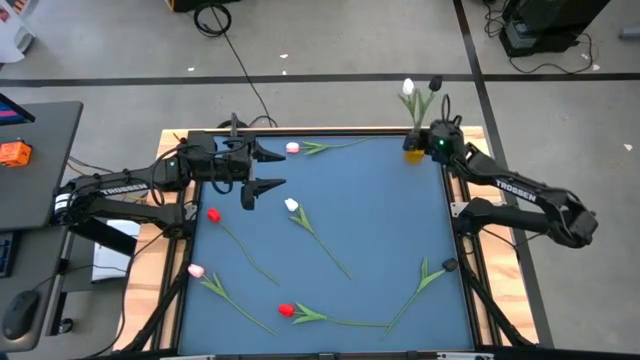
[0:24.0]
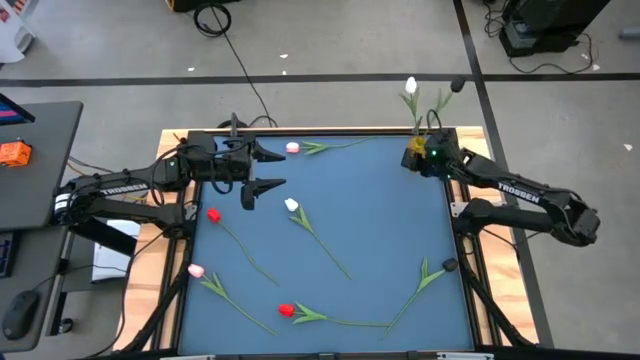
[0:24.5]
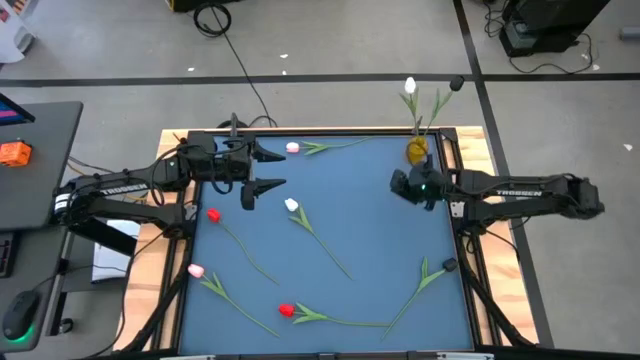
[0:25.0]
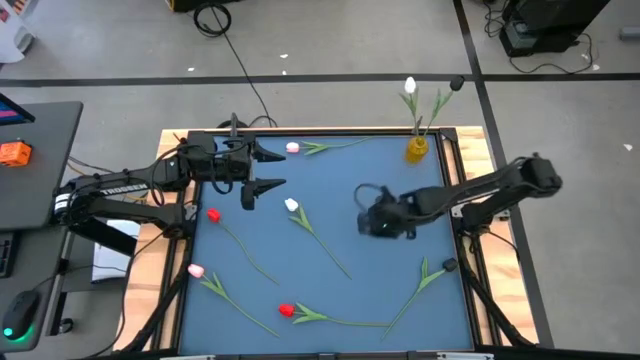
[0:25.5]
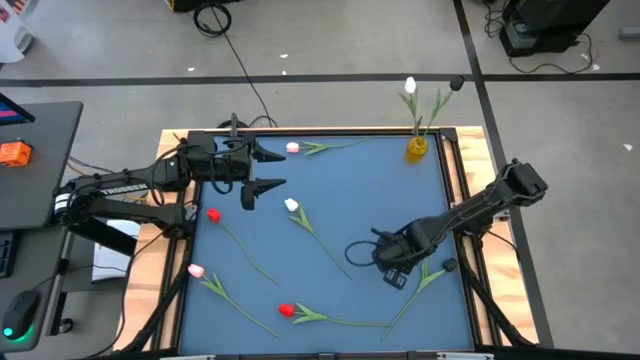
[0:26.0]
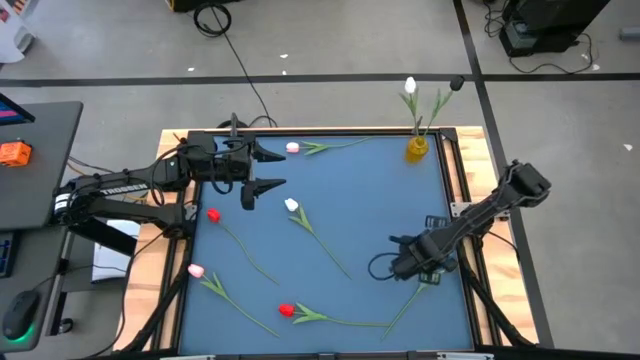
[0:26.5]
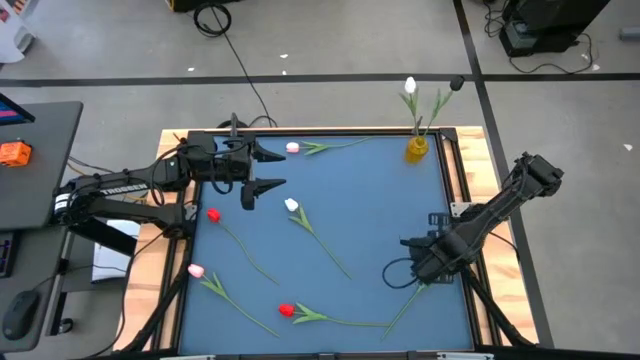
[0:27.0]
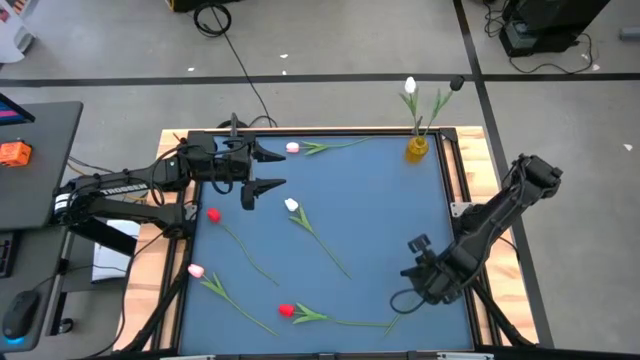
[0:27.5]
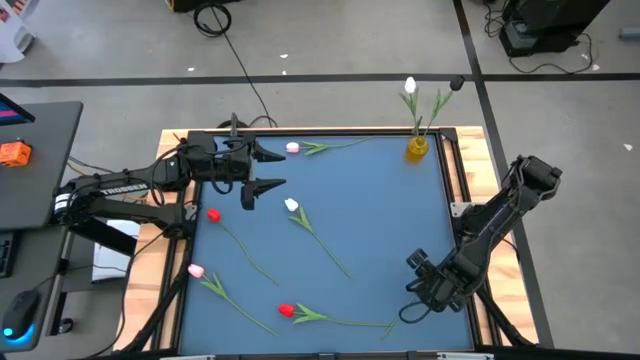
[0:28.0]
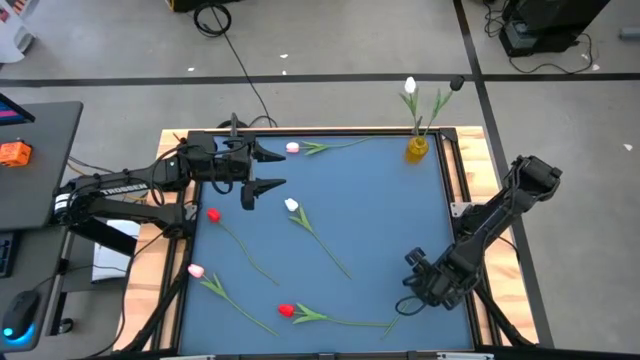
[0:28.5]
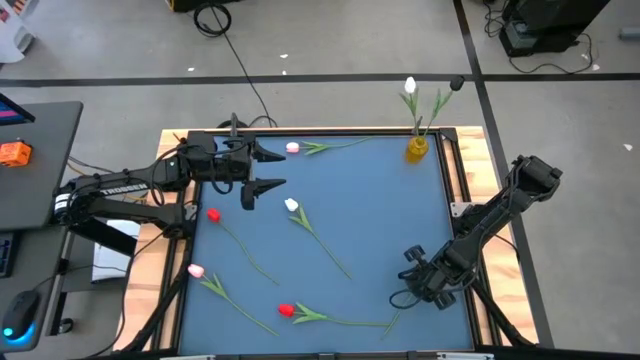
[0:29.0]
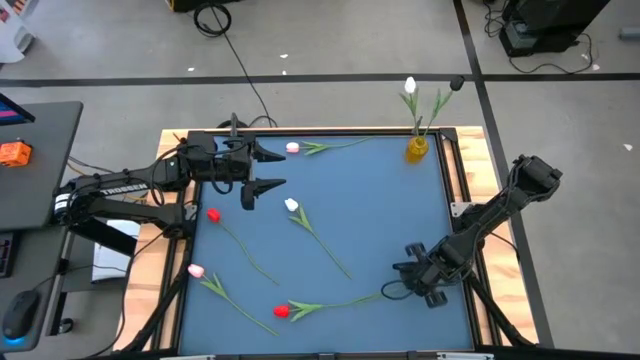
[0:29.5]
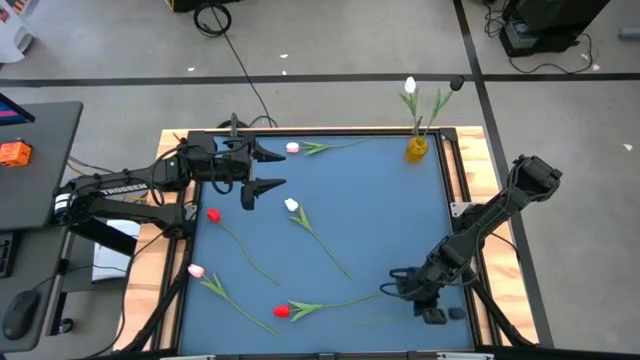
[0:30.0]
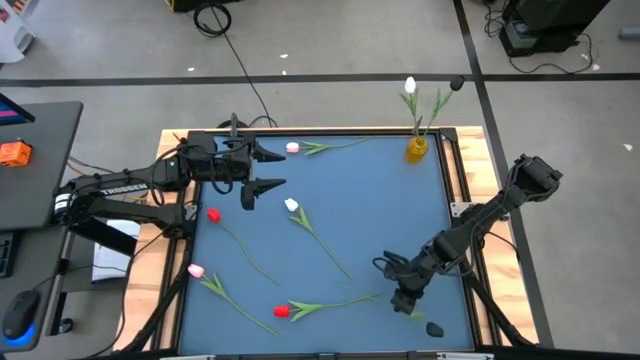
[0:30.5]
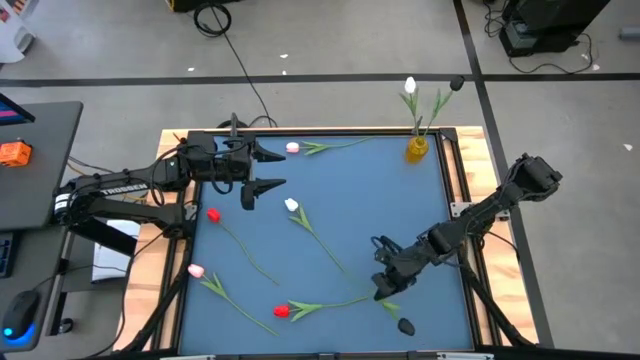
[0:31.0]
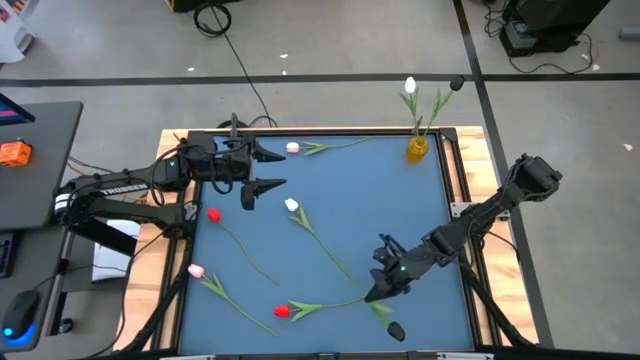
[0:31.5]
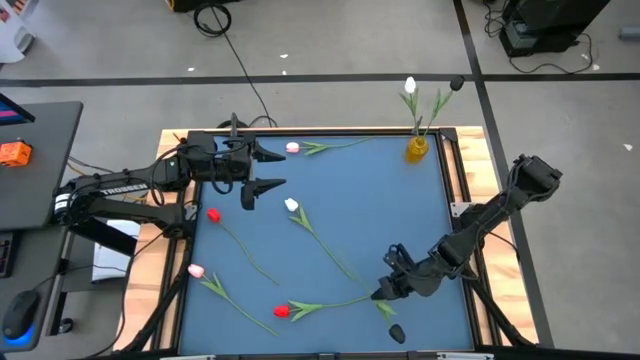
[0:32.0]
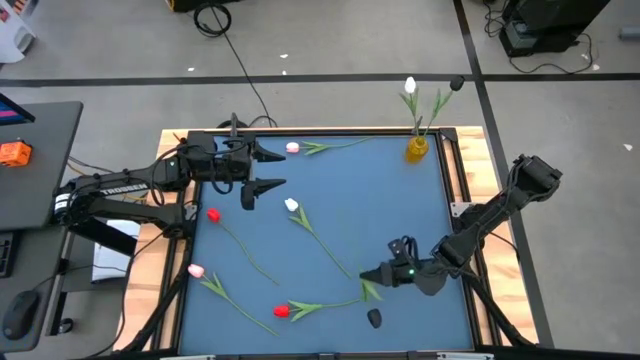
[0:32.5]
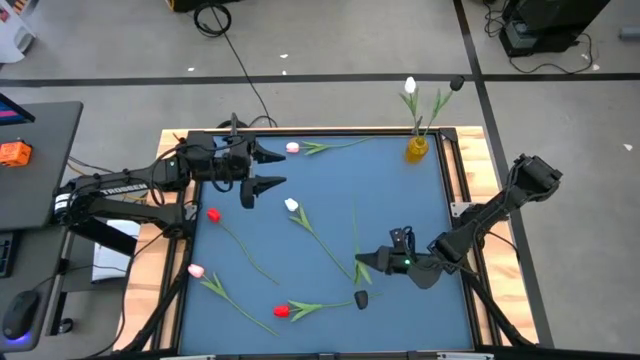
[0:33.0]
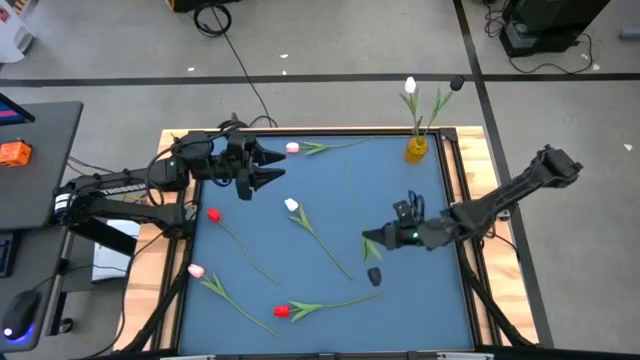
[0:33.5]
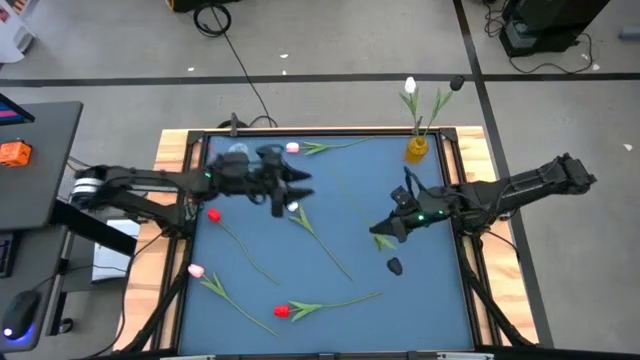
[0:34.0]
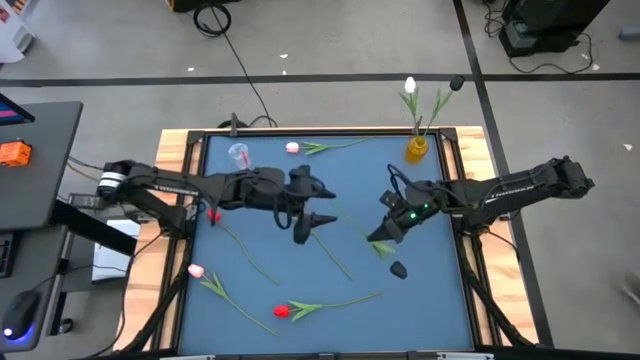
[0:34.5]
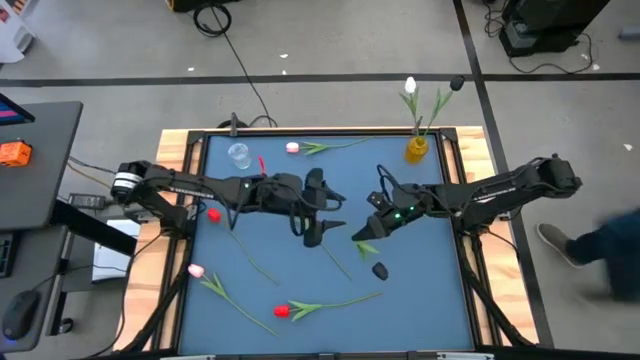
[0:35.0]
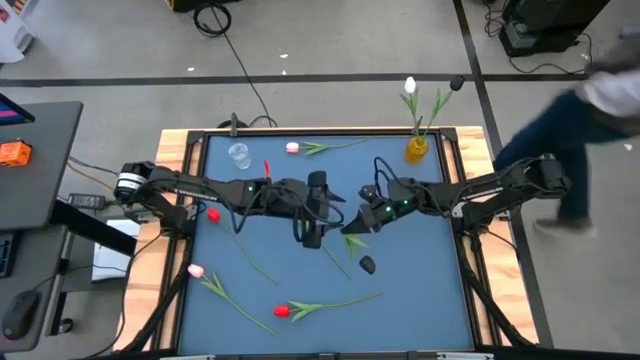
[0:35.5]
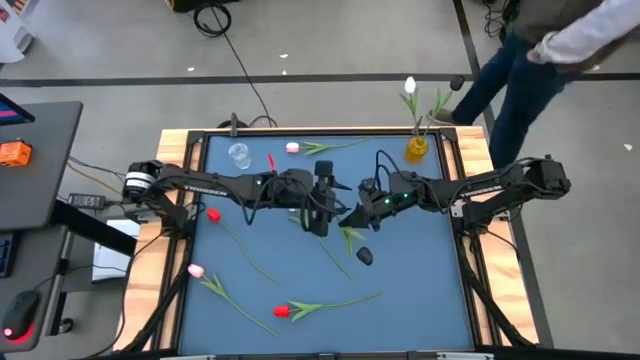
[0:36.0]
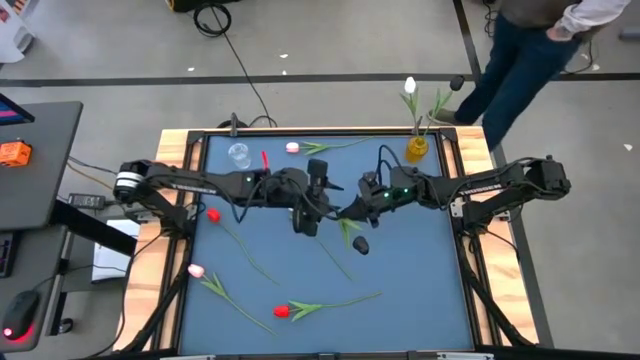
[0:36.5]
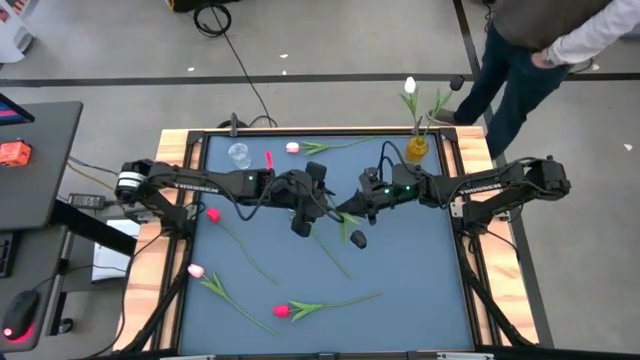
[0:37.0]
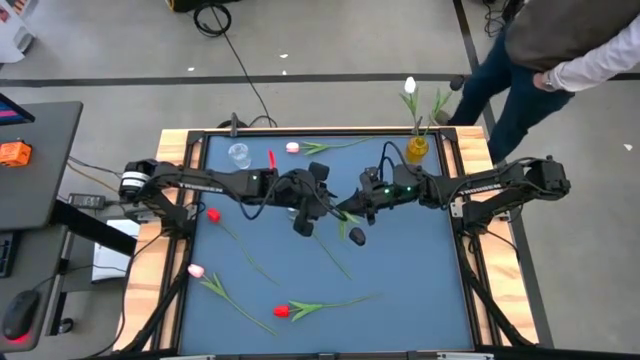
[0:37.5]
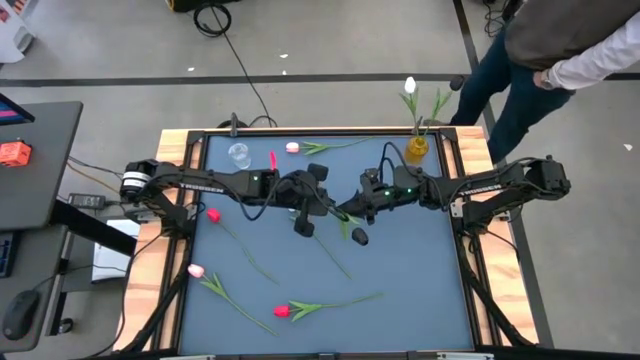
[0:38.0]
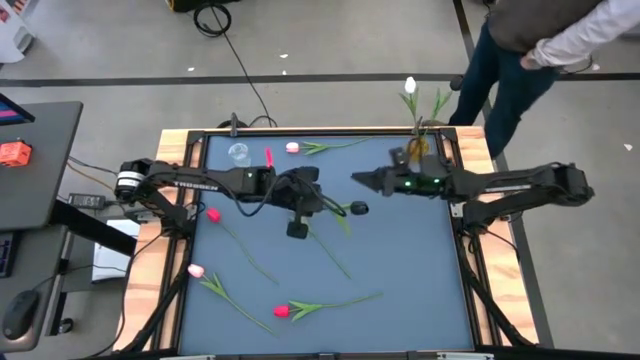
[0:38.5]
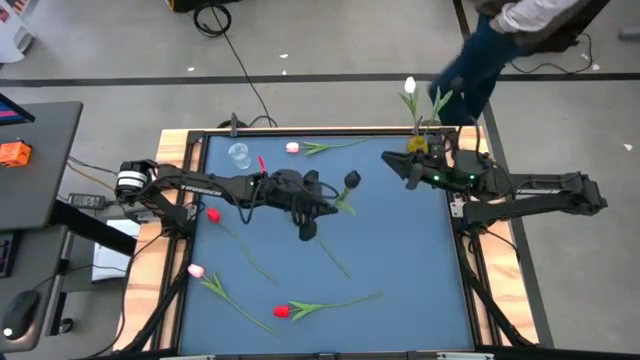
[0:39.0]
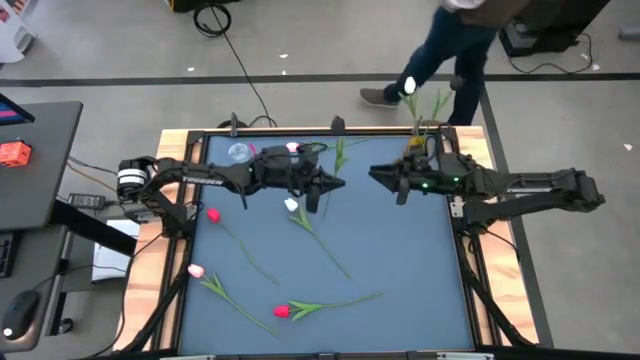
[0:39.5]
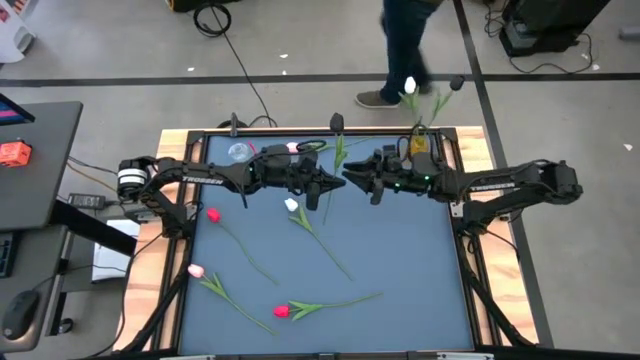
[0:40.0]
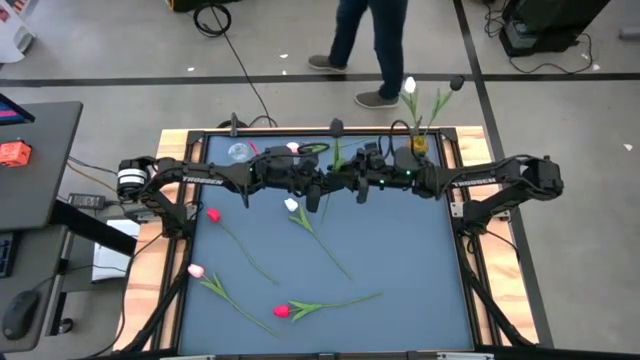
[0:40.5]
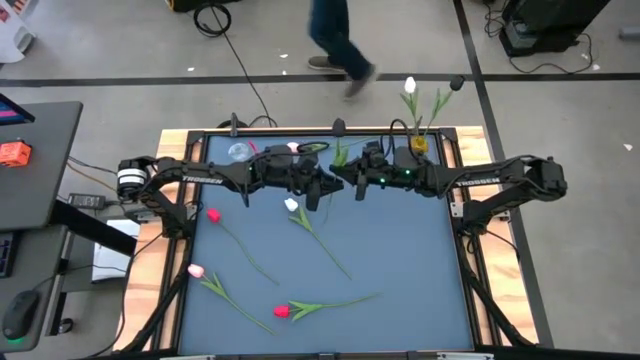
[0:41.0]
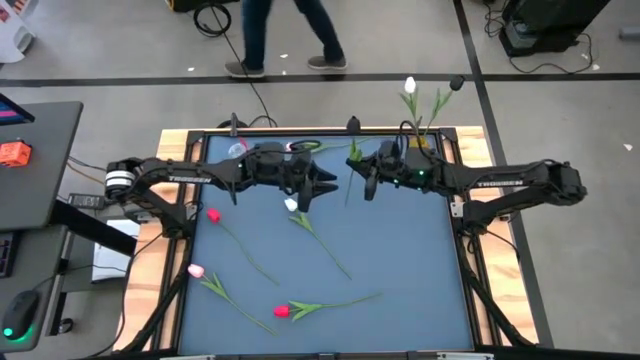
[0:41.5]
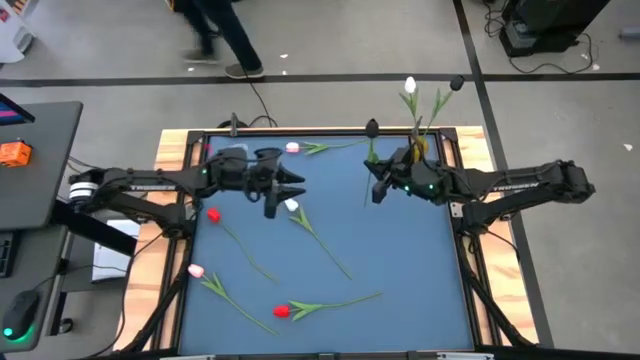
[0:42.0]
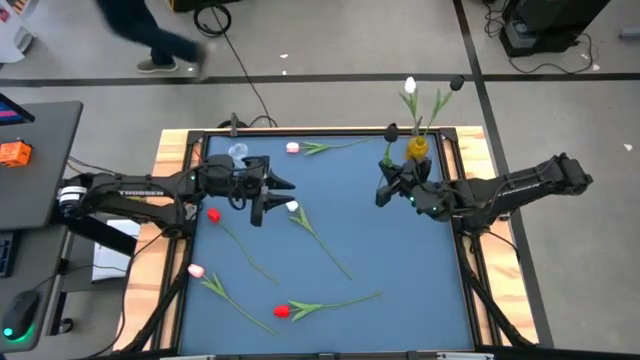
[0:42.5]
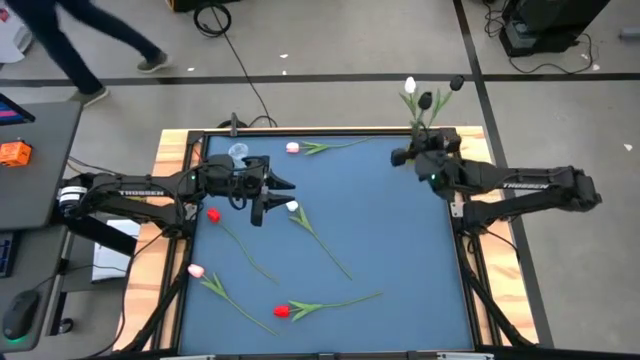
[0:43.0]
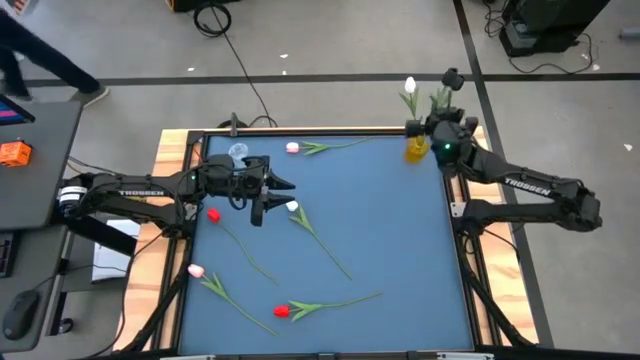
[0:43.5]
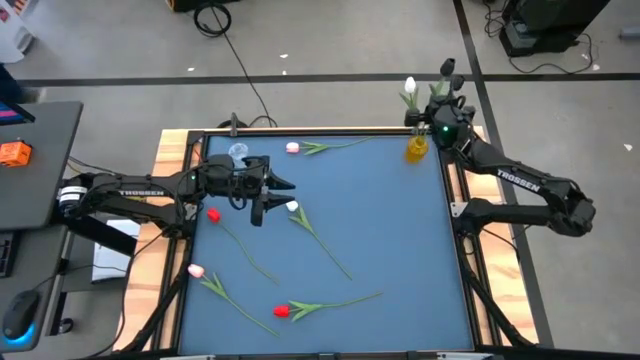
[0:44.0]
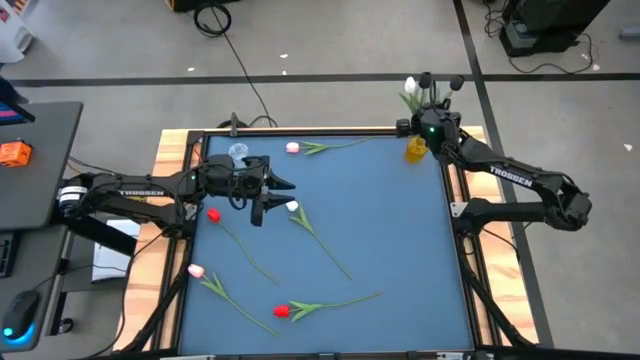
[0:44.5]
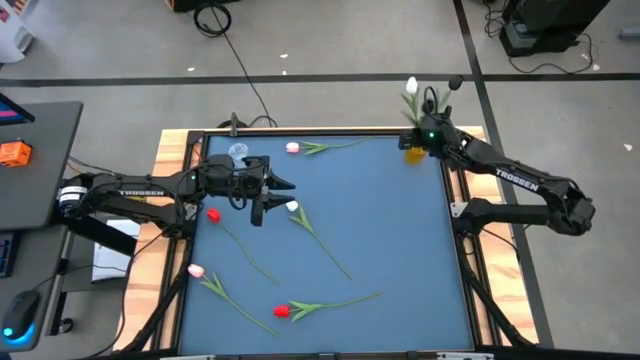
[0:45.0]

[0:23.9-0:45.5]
Task: Sort flowers into vase by color
Put the black tulip into the yellow vase
